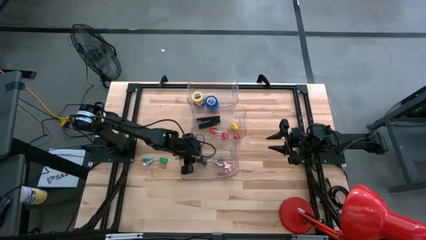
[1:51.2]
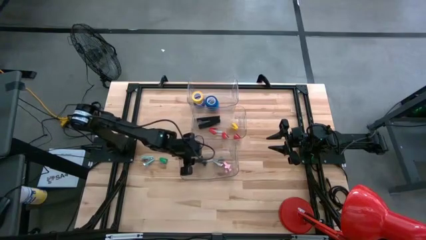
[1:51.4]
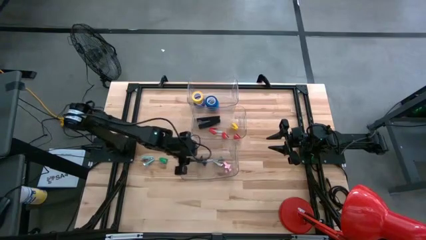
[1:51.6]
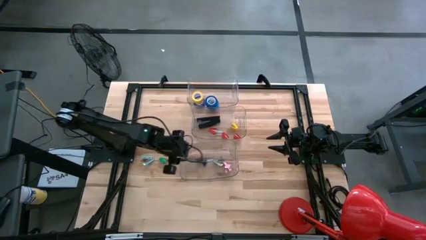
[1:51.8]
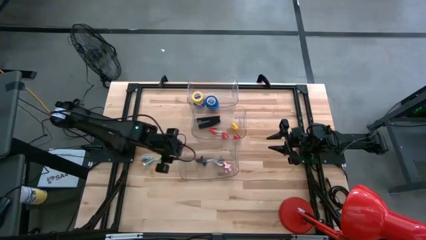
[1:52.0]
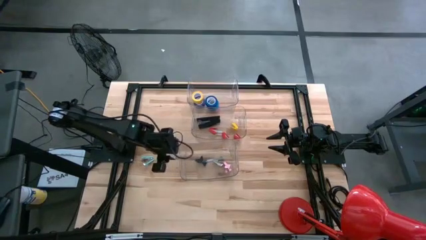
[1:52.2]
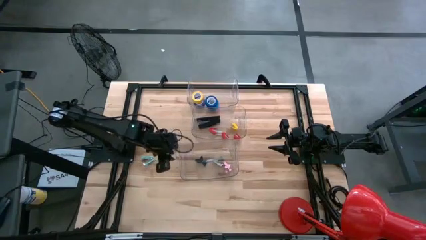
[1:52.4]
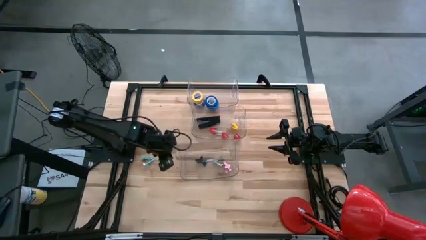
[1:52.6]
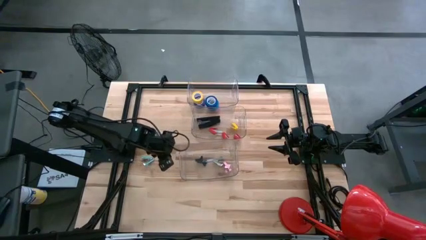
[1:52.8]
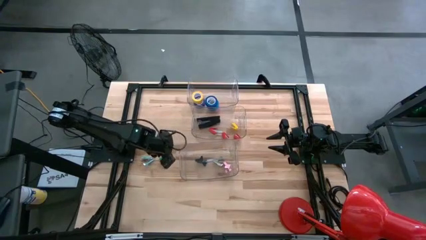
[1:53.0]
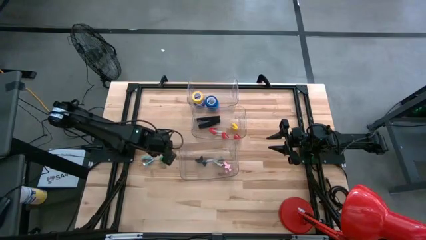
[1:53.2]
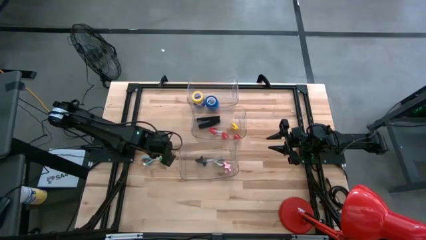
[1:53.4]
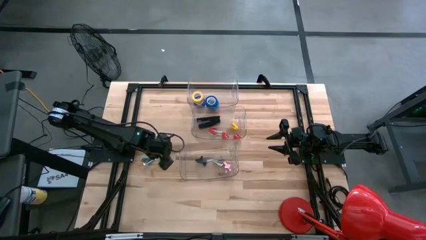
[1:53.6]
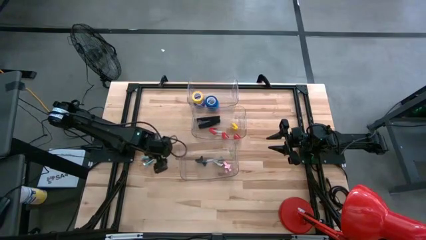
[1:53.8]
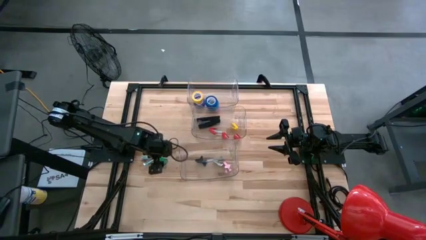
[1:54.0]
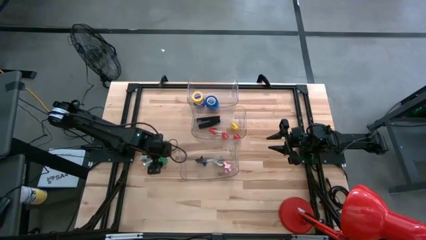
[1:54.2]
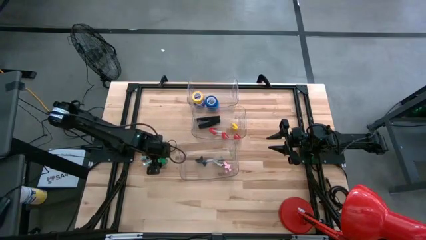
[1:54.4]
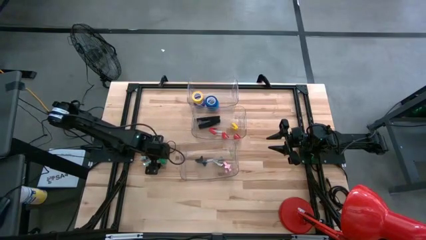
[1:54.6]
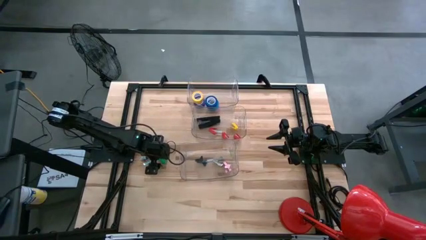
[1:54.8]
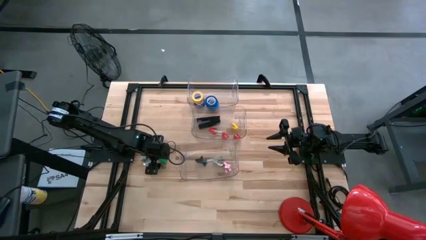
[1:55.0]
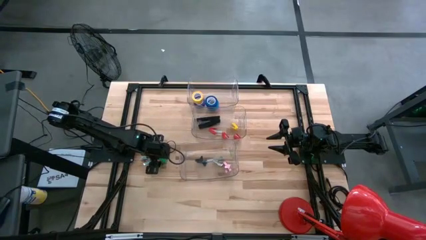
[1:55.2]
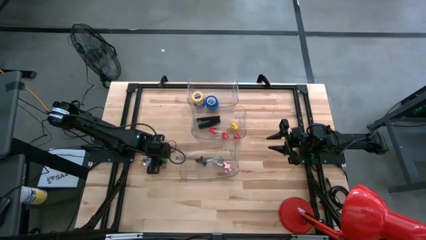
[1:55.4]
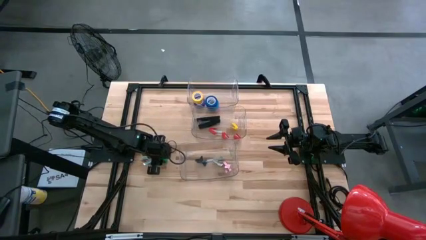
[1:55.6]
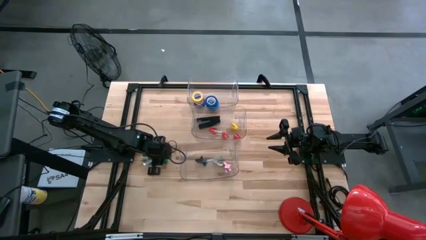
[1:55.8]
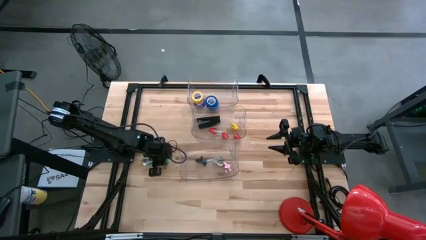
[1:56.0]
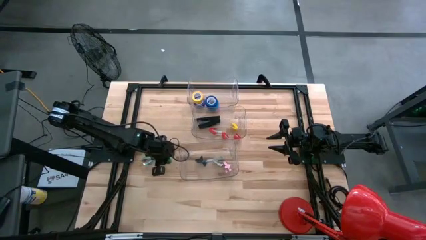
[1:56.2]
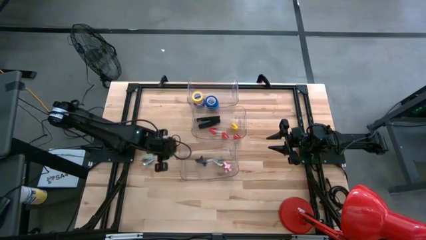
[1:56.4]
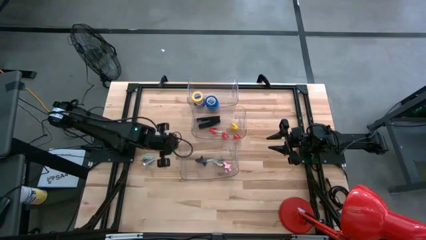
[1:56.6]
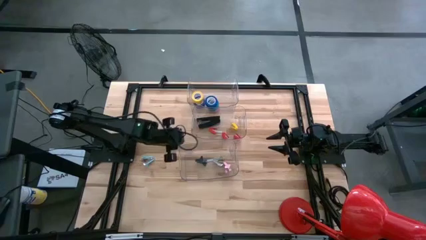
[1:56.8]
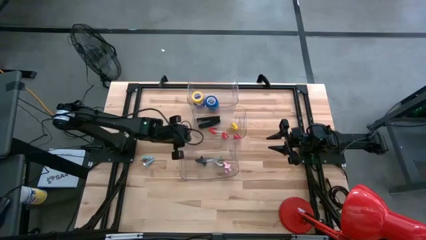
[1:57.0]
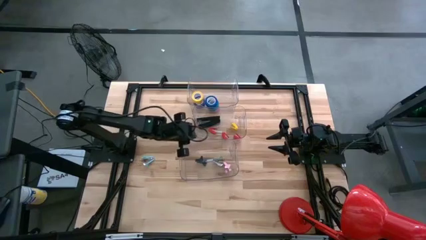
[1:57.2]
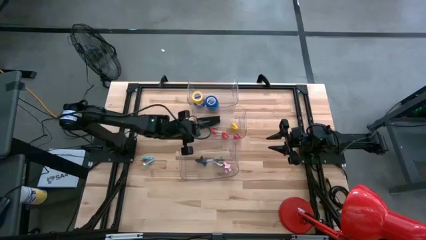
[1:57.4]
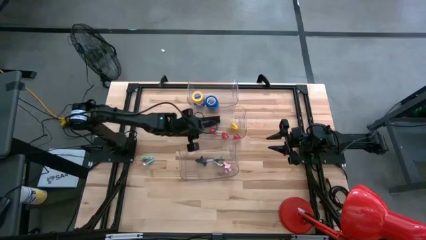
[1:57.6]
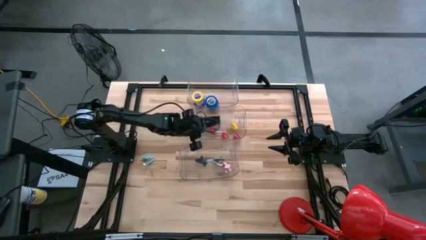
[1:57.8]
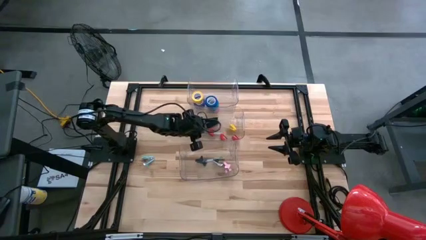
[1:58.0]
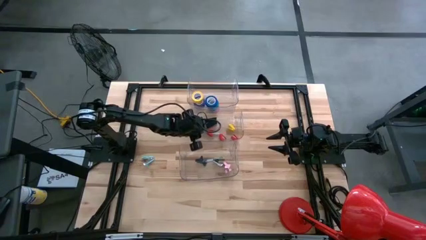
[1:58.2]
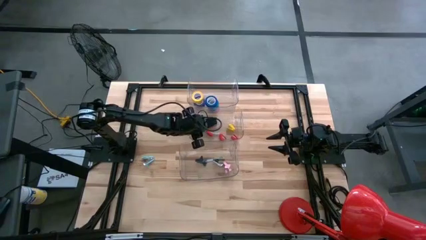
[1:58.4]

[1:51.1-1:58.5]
Task: Pick and place Stapler, Stapler remover, tape
Put the green stapler into the middle transparent bin

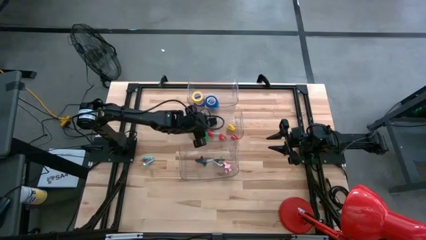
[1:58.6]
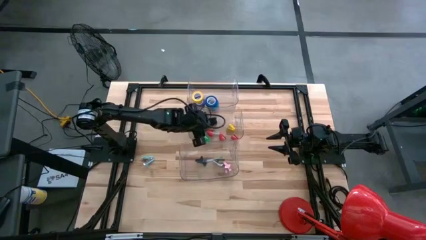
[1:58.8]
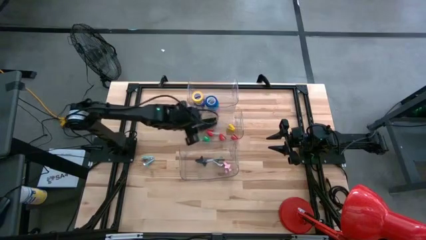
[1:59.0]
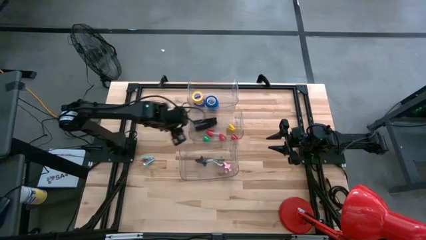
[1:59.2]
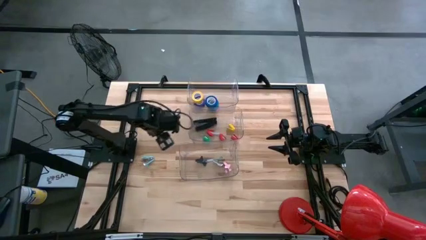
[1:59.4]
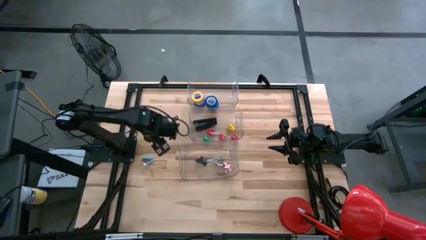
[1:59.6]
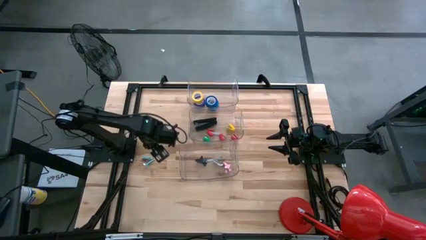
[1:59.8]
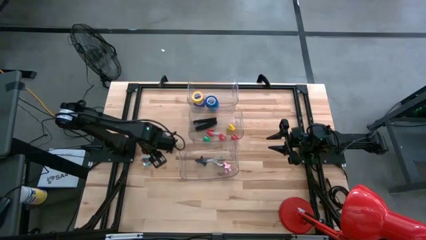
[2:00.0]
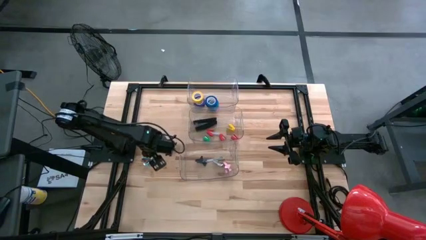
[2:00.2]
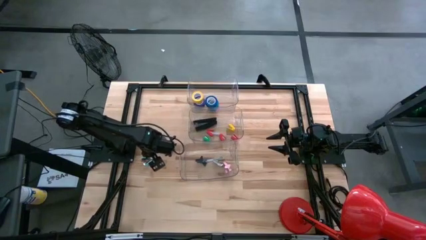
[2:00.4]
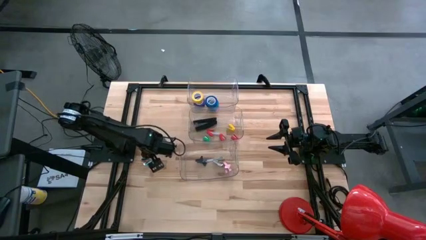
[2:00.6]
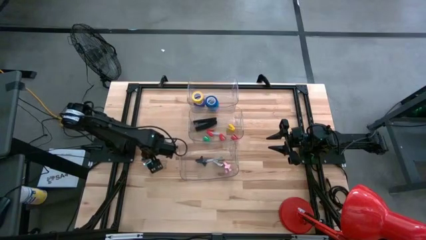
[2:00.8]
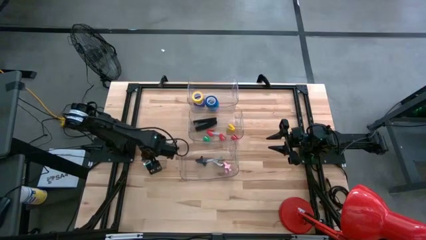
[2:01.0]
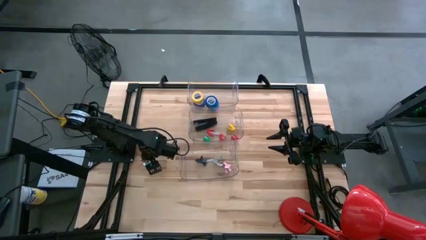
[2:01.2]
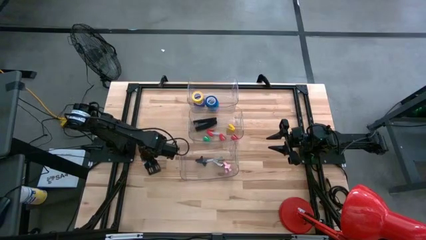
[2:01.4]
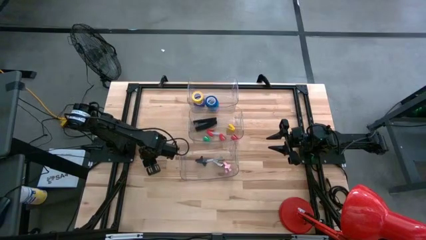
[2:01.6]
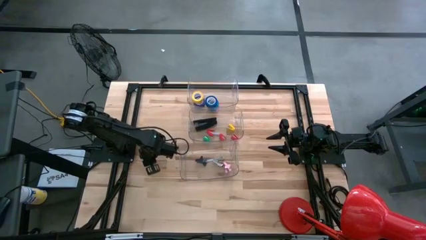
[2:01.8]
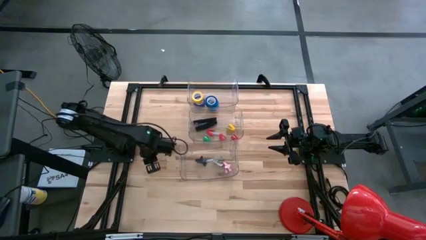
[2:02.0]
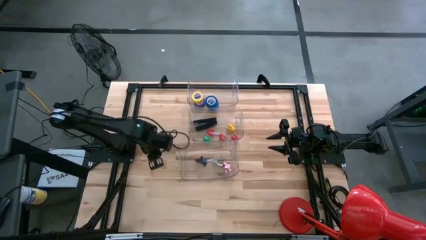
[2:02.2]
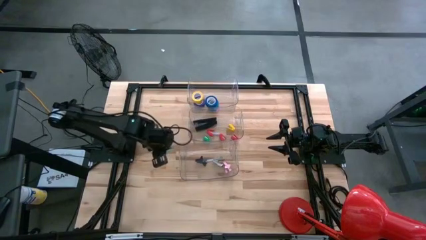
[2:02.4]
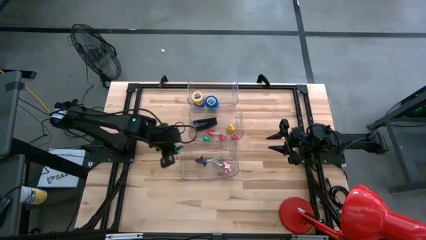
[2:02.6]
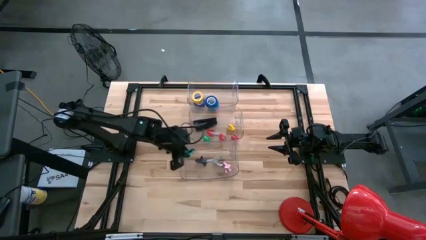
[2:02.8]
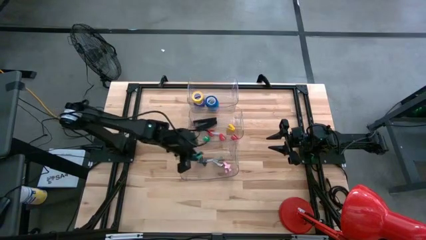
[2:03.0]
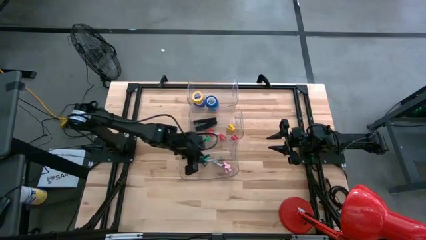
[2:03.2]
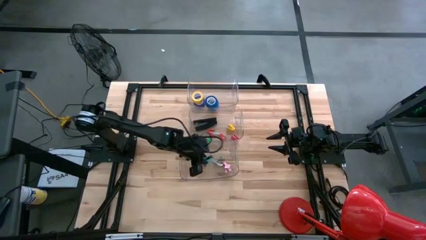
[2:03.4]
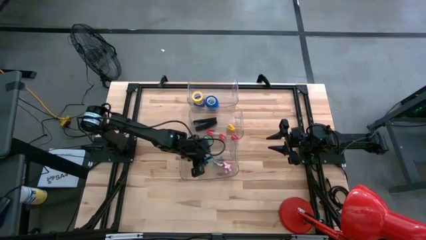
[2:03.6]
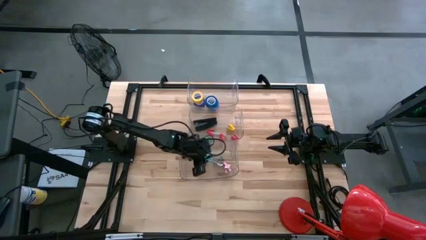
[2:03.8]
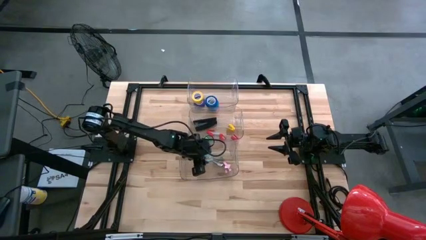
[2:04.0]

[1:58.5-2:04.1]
Put the light blue staple remover into the bottom transparent bin

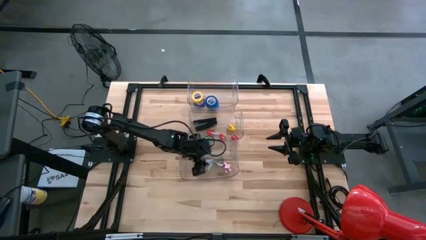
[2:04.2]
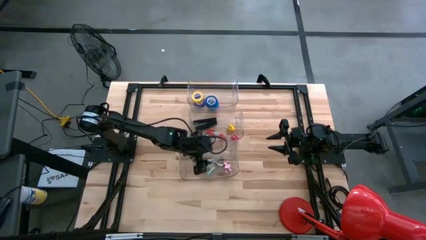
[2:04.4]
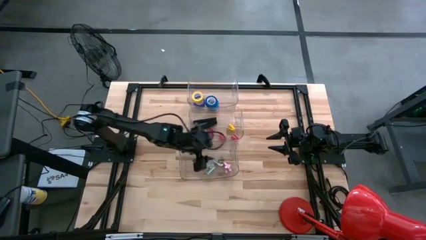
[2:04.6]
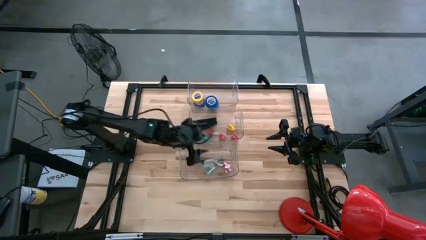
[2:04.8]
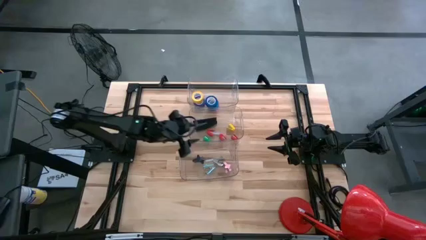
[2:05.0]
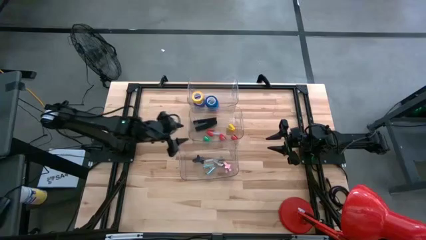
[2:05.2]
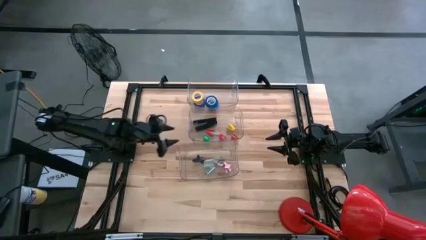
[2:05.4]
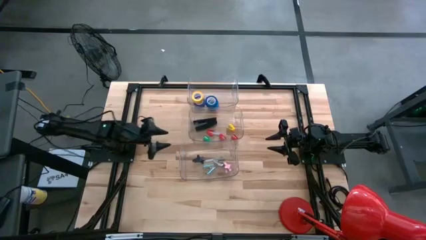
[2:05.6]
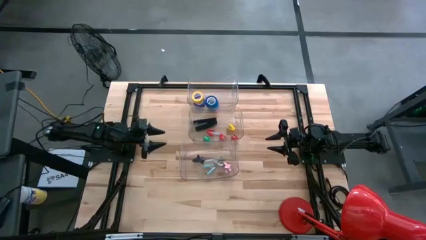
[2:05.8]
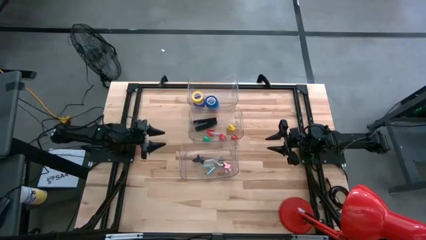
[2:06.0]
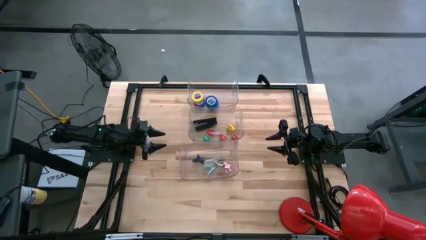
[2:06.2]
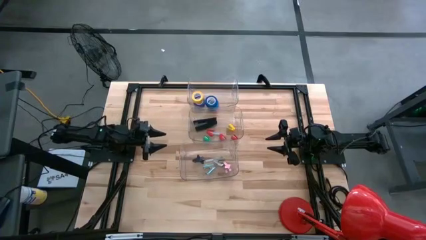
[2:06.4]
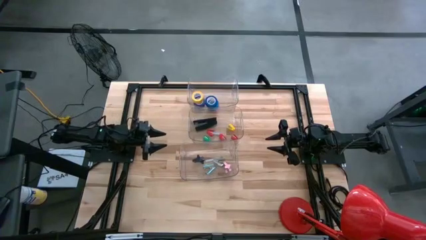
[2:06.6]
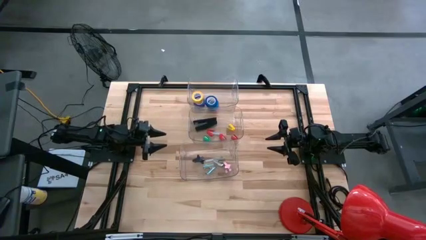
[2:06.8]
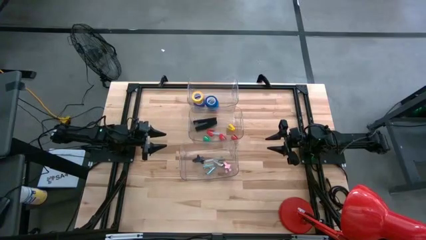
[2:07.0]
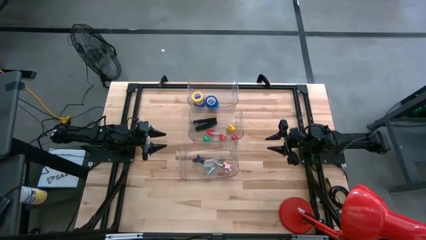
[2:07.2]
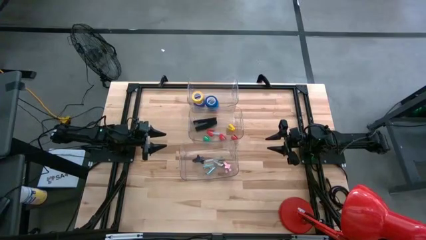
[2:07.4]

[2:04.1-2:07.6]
Return to Home Position
